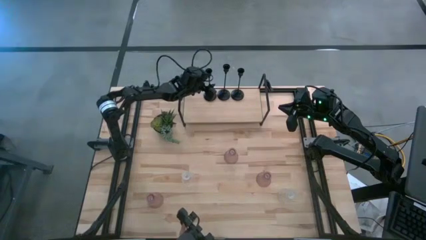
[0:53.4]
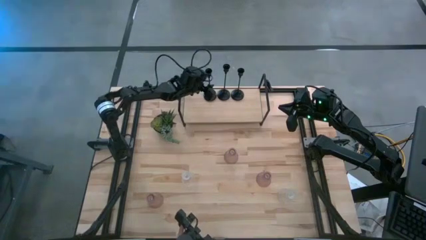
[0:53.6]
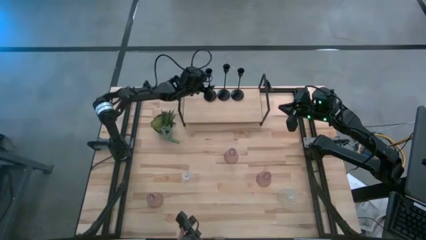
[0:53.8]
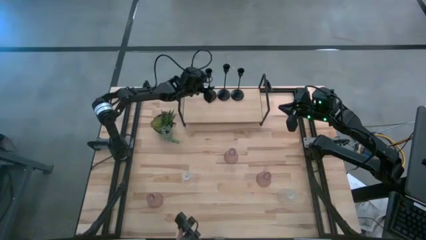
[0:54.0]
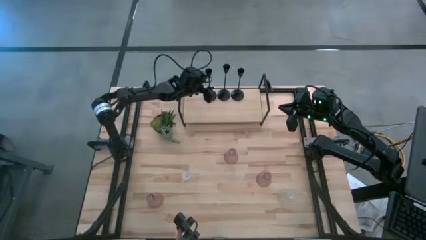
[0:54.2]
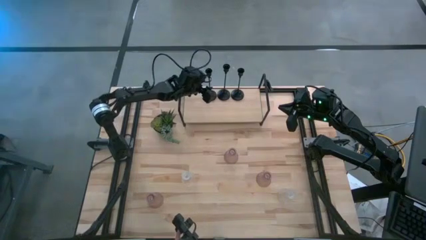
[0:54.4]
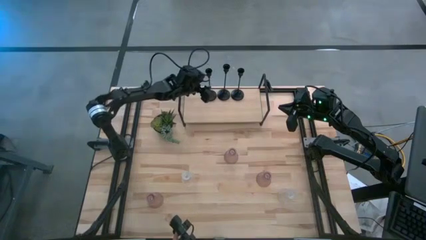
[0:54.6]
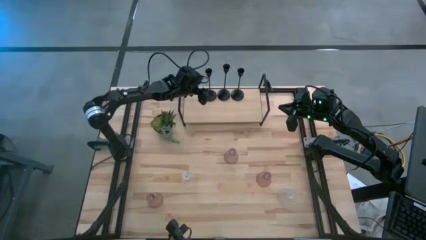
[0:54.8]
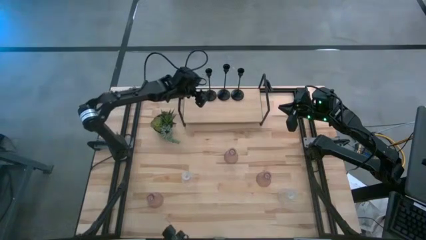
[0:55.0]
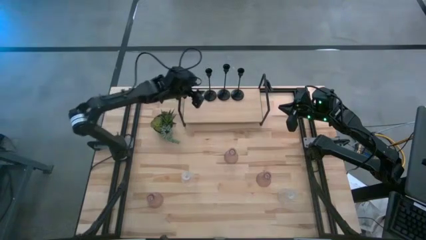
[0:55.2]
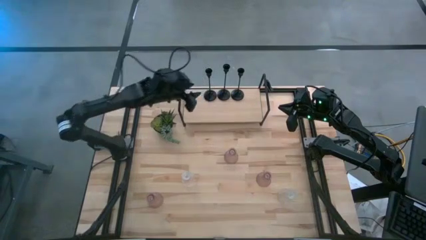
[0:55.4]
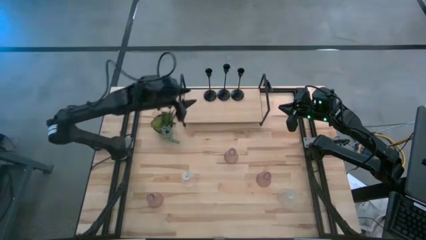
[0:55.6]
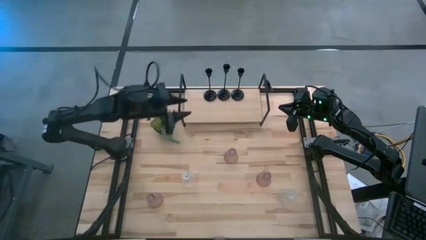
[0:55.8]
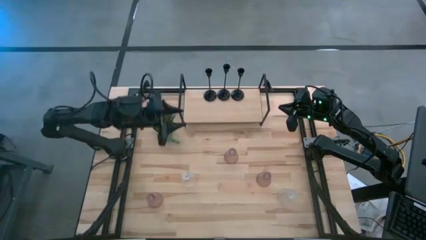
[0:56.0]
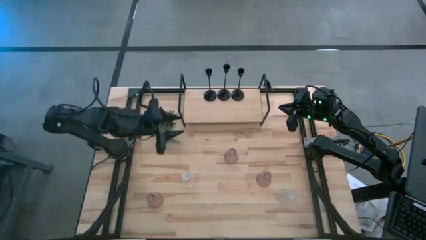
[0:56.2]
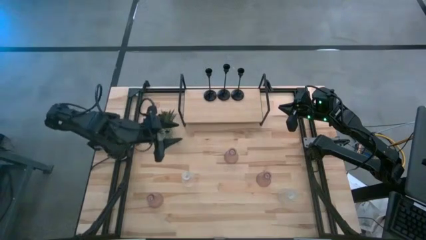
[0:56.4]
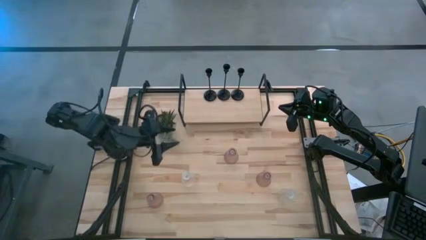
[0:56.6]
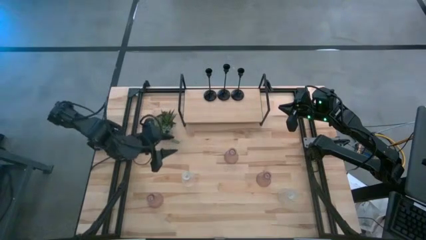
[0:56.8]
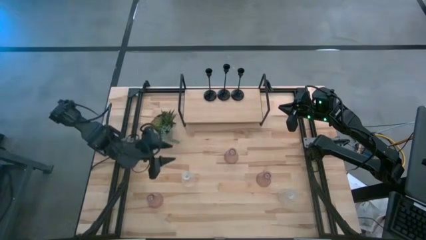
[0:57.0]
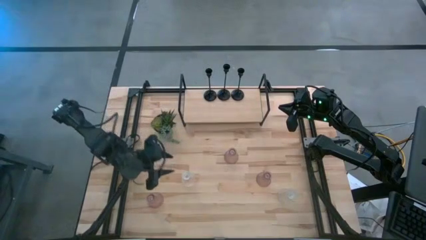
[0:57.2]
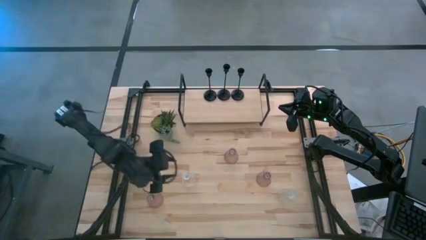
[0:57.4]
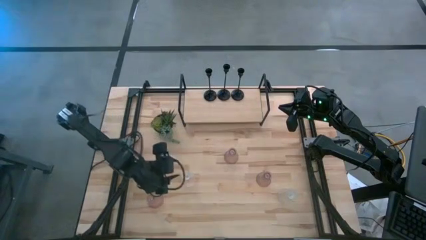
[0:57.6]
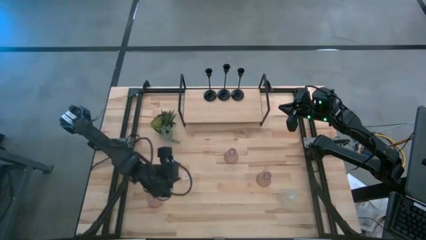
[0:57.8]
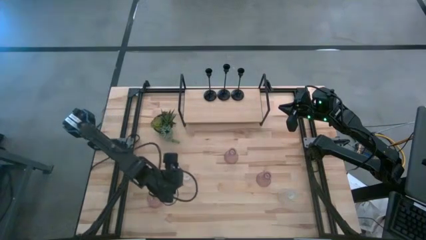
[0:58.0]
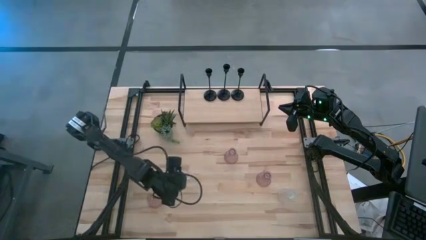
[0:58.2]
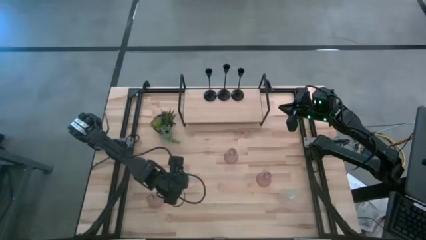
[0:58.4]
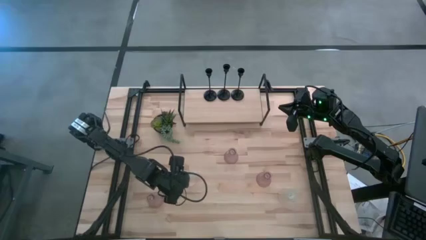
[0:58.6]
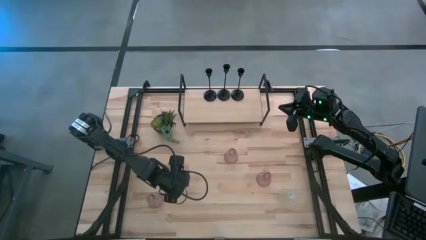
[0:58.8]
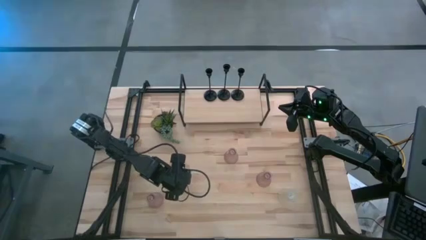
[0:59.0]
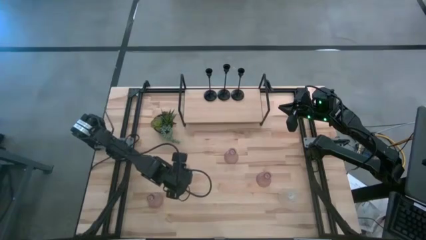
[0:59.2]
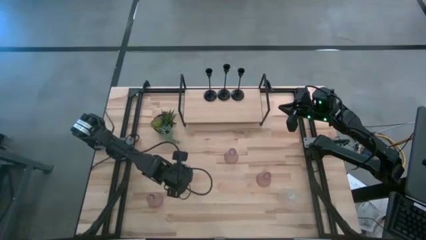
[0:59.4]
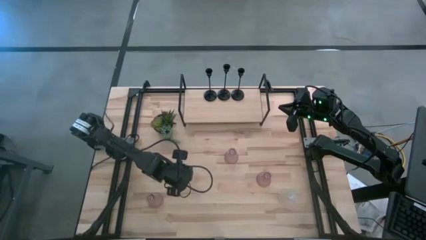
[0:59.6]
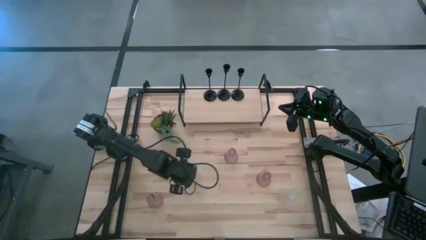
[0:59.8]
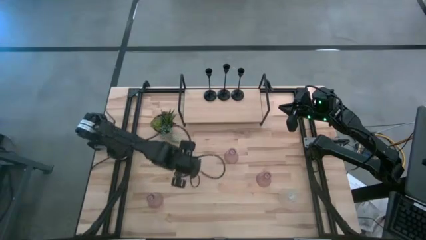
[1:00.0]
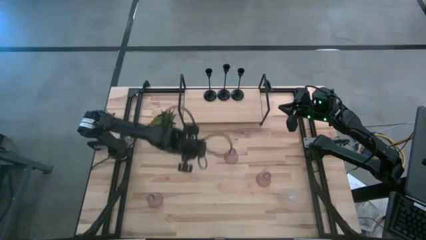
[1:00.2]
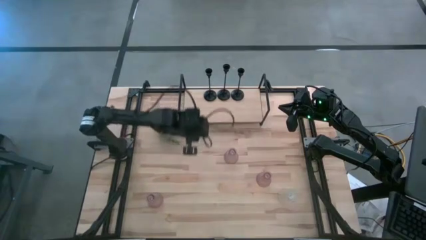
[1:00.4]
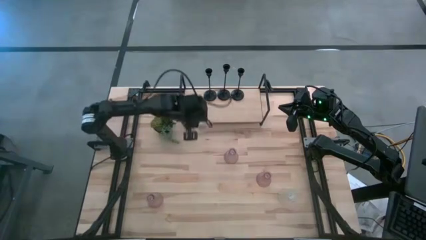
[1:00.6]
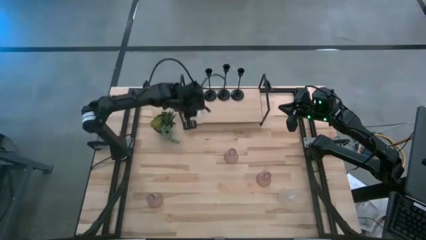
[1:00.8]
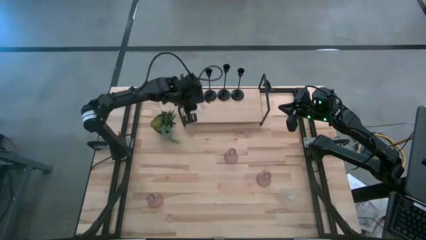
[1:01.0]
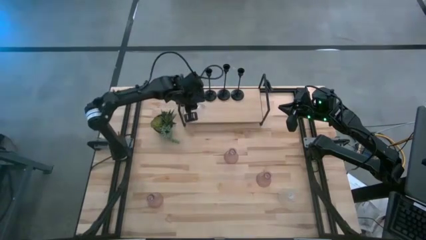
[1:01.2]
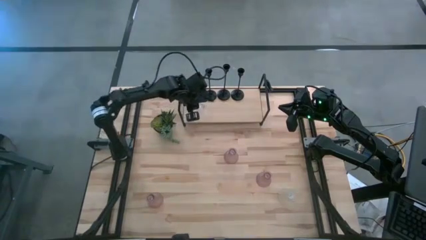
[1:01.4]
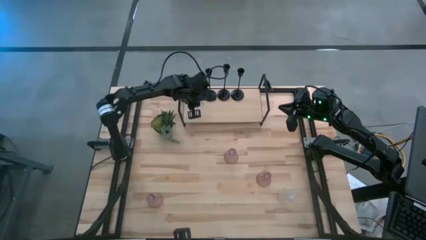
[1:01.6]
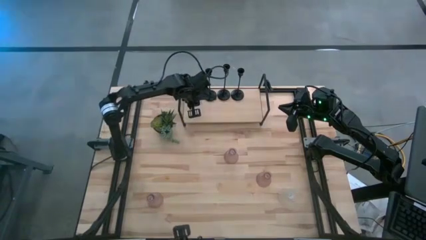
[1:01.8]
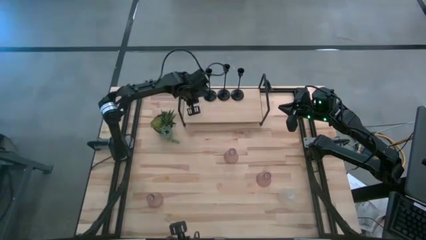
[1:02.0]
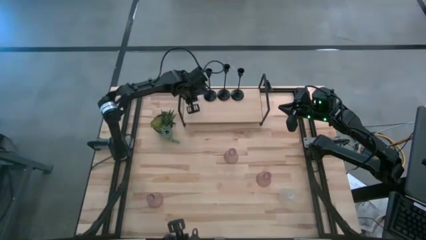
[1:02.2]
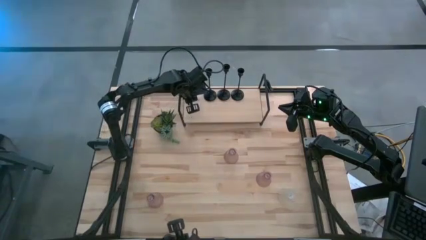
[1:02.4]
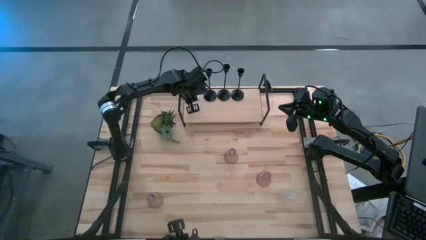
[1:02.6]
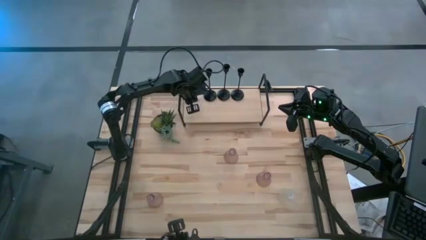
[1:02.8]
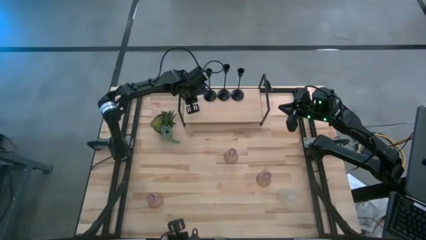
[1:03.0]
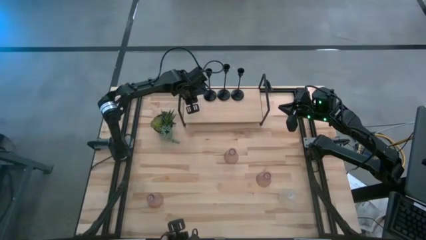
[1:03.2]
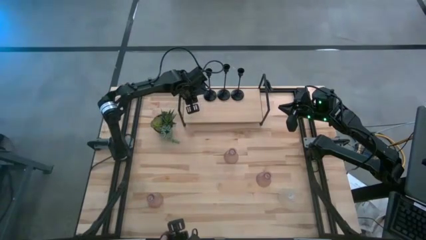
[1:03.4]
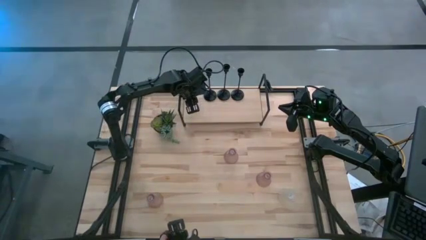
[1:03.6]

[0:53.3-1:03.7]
Task: Pick & Place candle stick holders
Put the left transparent candle holder on the shelf

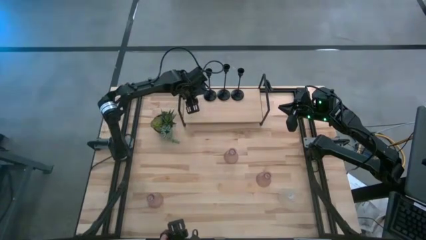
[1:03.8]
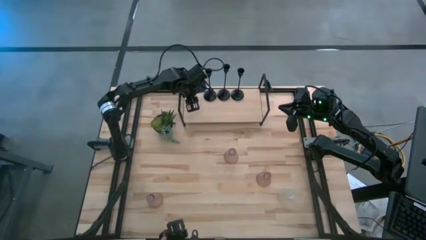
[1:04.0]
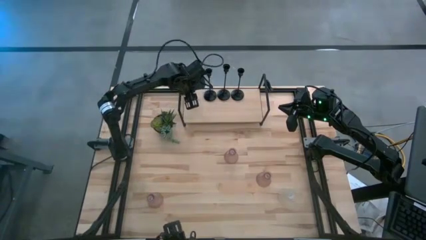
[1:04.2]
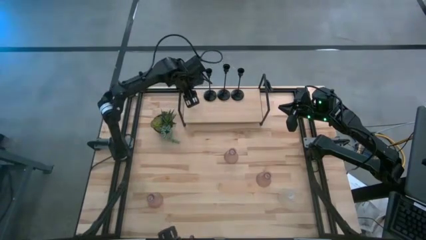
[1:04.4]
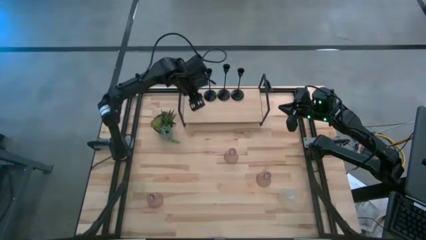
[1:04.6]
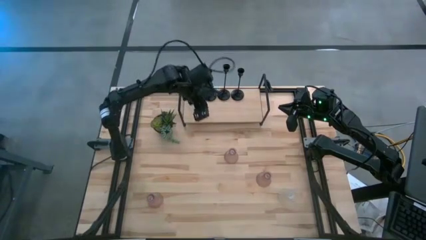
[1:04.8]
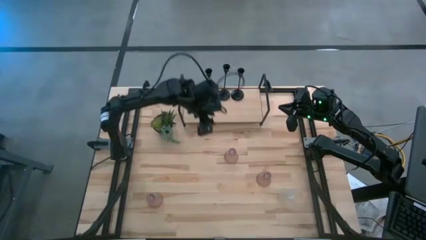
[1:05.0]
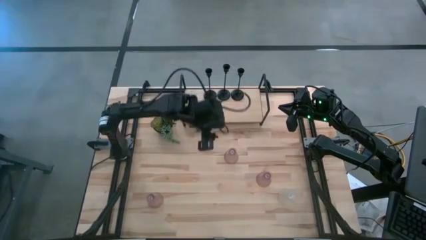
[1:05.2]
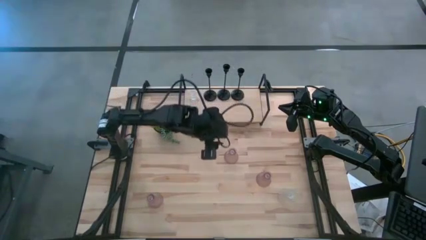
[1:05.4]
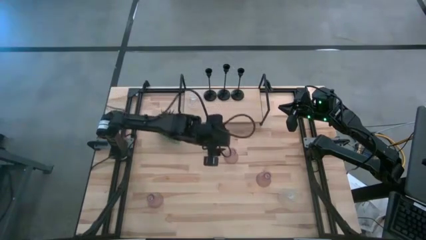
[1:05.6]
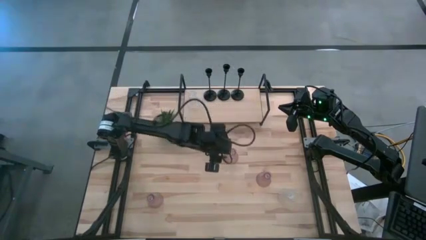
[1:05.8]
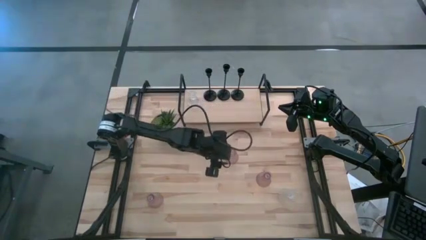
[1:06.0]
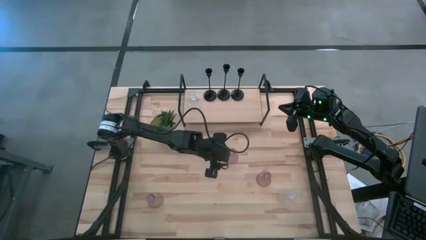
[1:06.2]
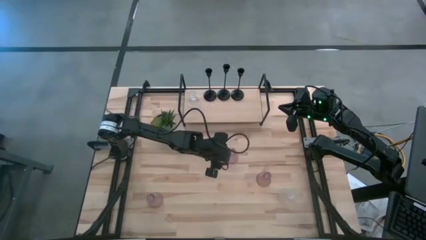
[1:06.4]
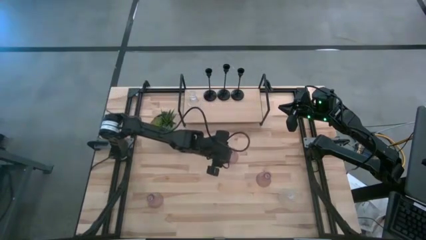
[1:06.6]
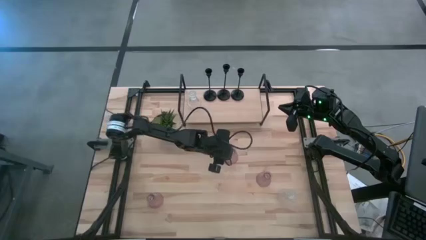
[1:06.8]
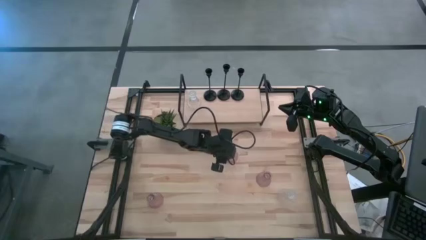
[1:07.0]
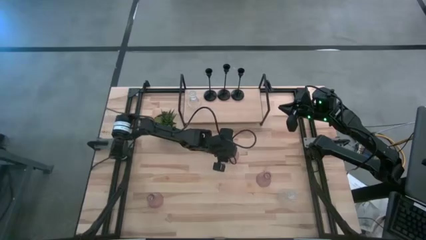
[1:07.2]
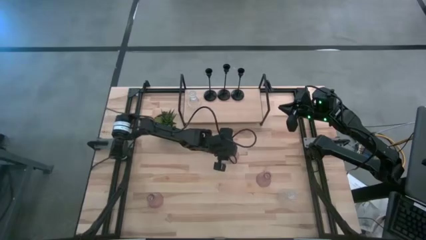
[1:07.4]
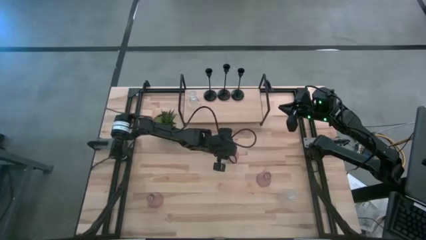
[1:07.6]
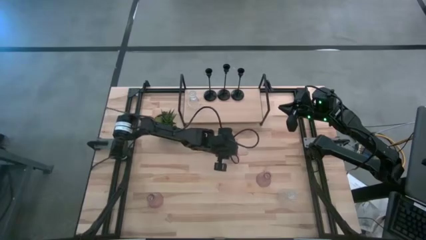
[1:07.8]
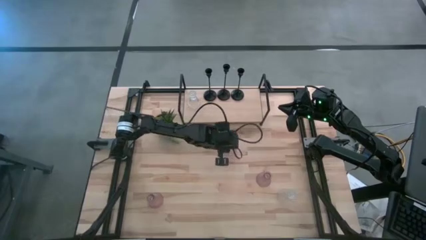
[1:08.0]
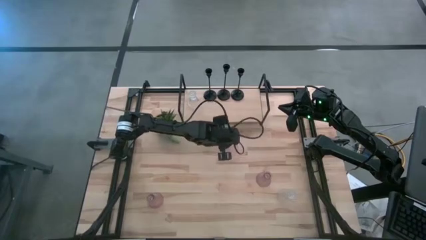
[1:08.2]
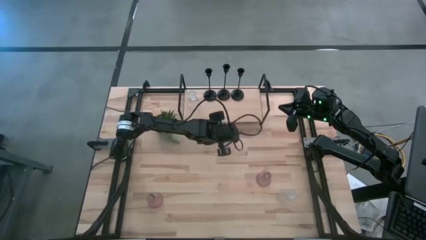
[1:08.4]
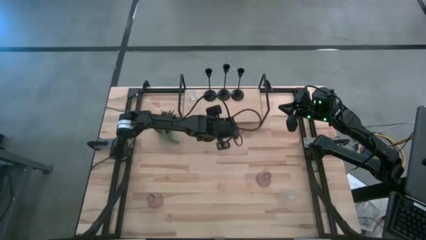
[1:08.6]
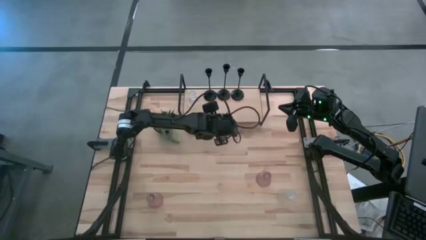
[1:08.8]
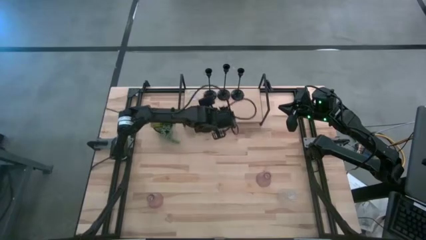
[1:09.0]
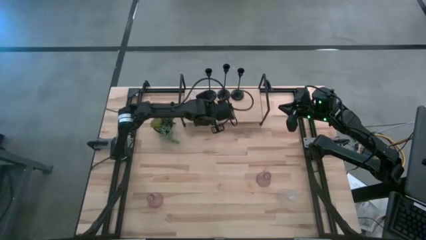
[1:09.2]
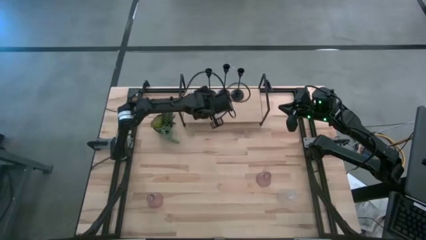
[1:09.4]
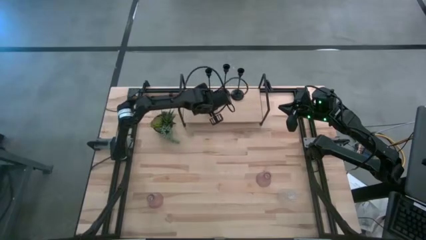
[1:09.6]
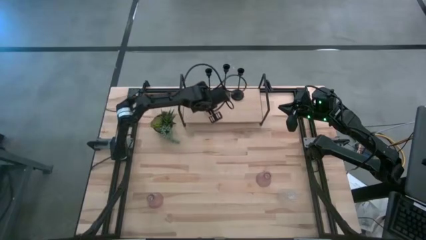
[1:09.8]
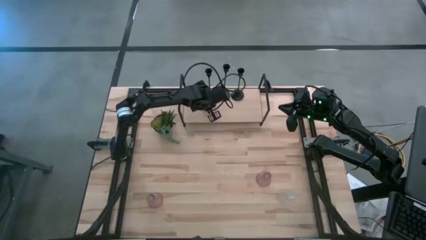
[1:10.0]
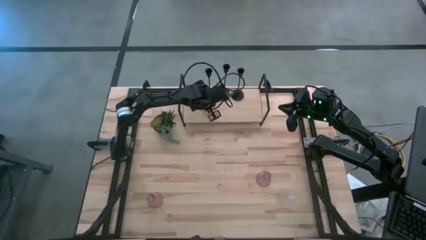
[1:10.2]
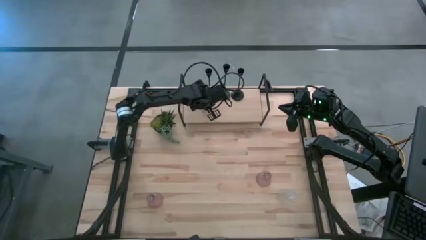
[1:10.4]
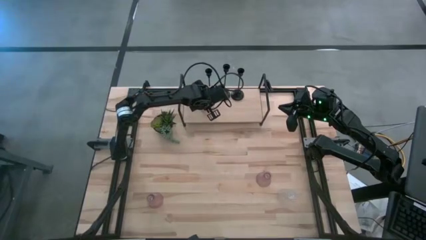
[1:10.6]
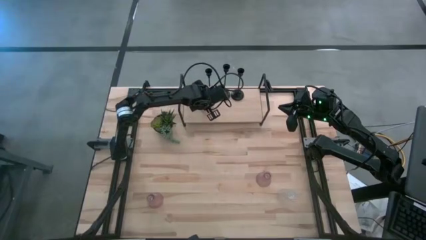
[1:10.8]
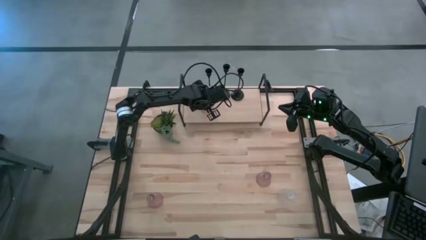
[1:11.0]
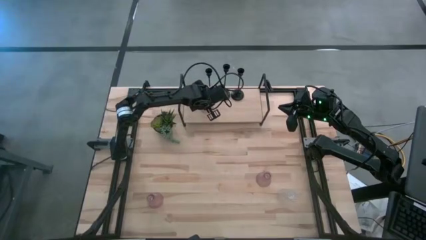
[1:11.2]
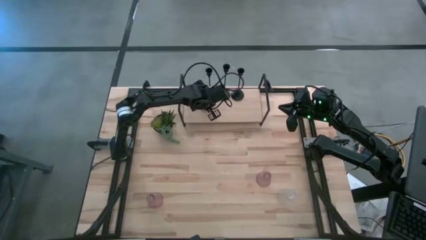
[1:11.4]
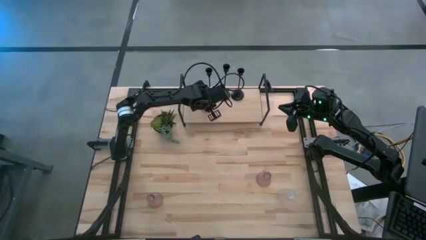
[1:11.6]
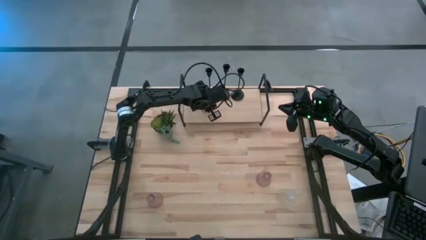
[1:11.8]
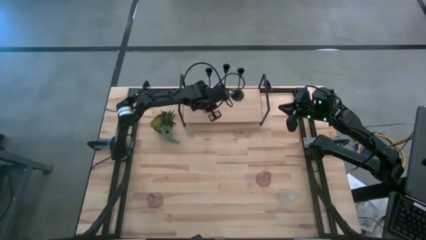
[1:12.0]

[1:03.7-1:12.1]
Put the top pink candle holder on the shelf
